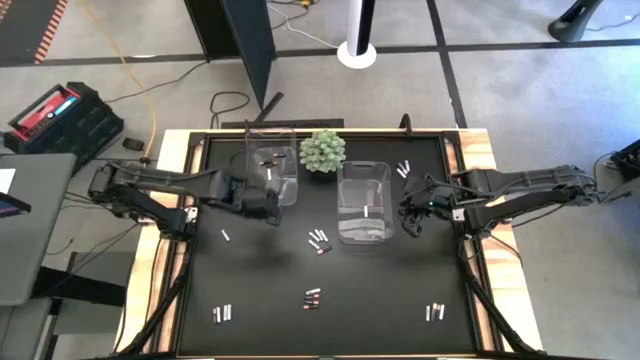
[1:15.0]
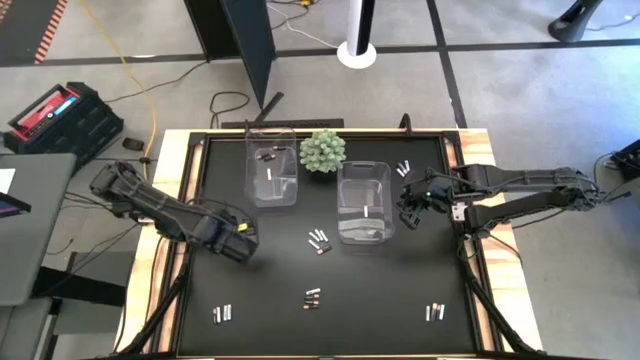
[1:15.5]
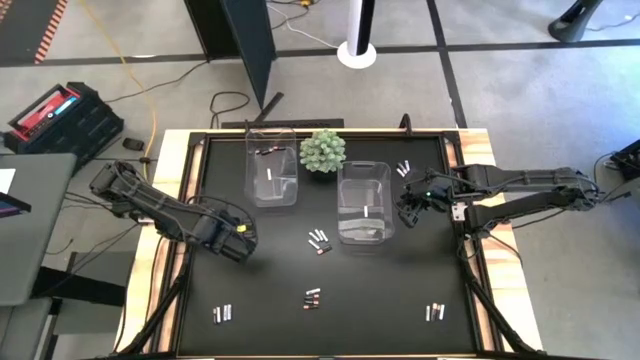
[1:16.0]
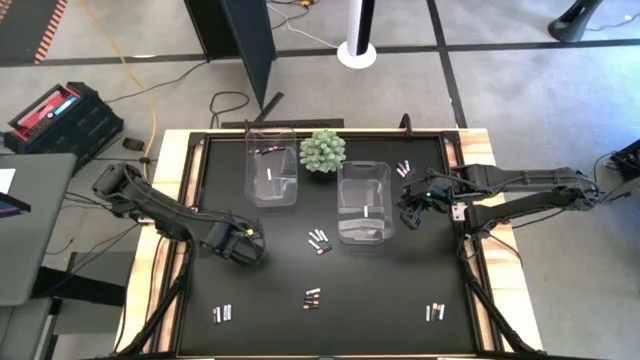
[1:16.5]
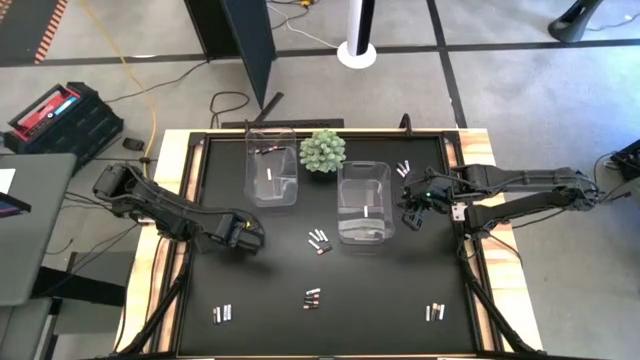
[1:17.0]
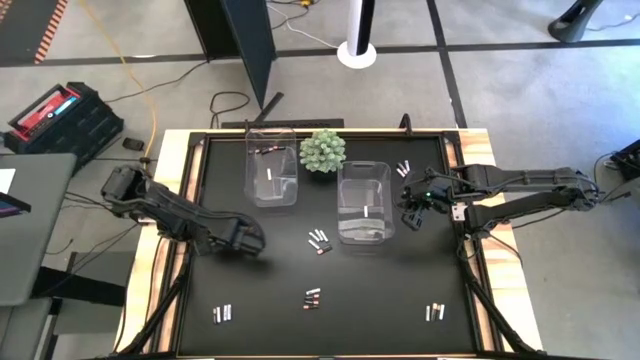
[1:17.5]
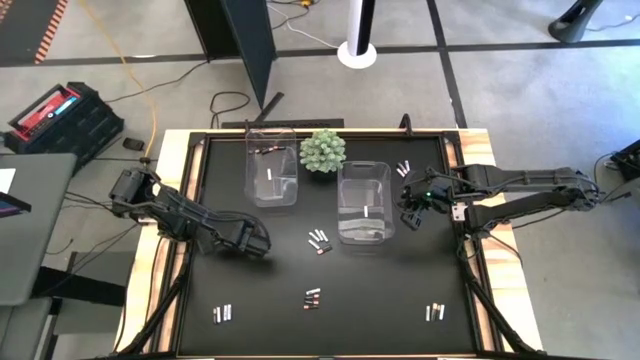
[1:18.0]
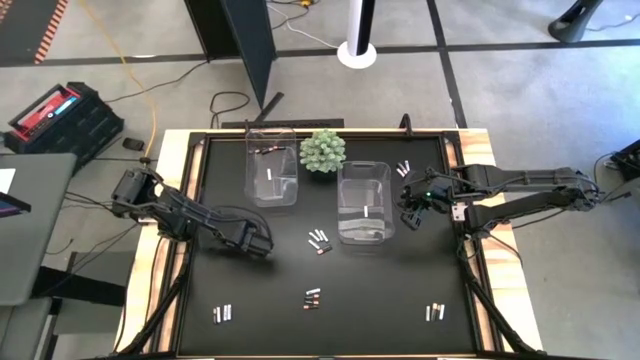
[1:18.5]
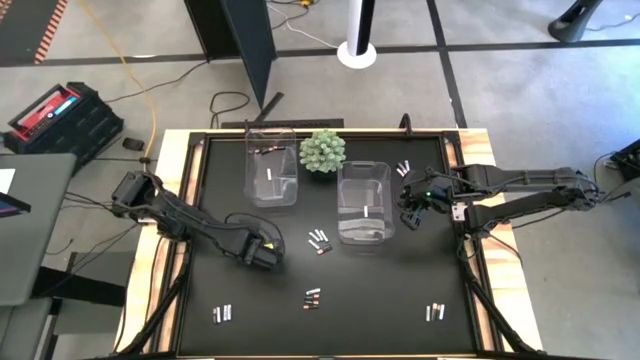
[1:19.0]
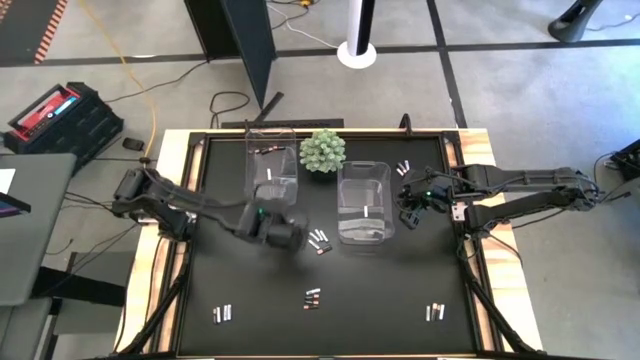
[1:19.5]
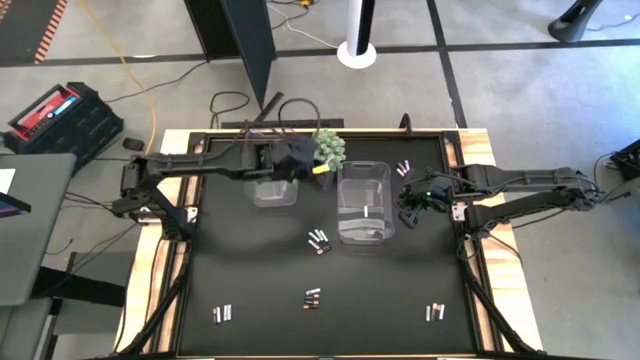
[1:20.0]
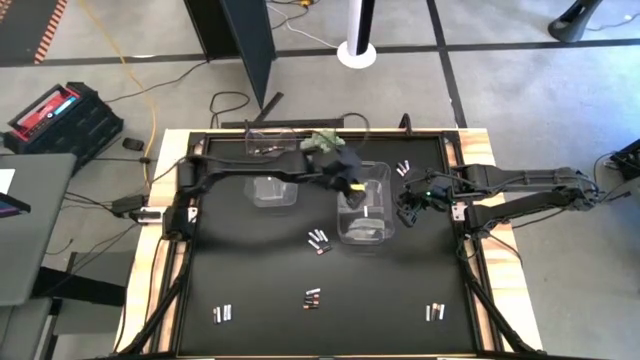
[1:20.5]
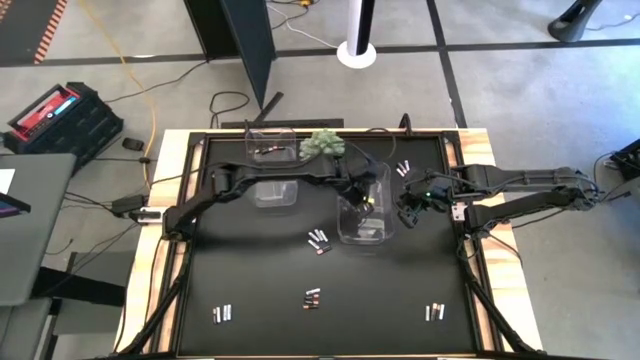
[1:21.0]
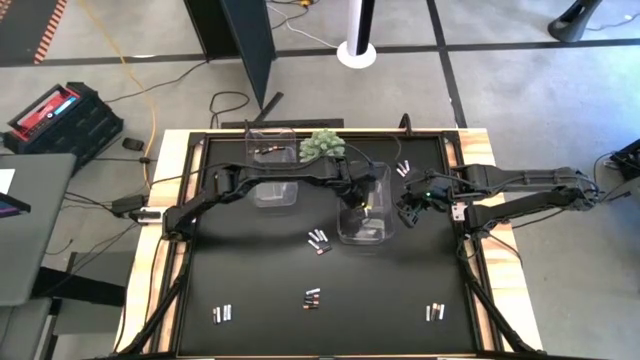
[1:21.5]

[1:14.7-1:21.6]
Task: Sort batteries
Put the white-blue battery into the right transparent bin

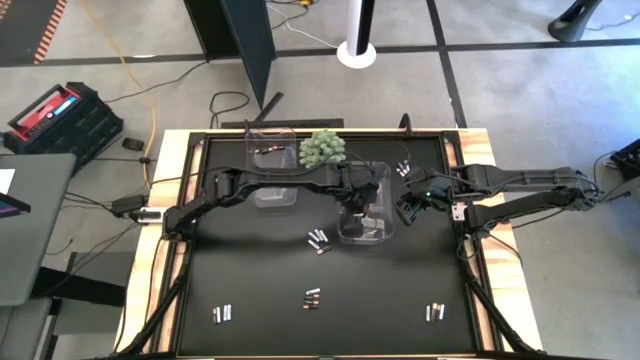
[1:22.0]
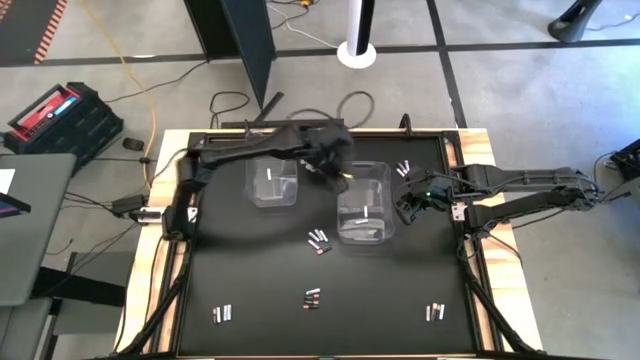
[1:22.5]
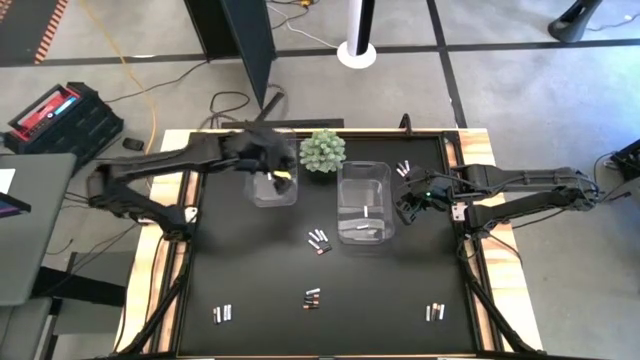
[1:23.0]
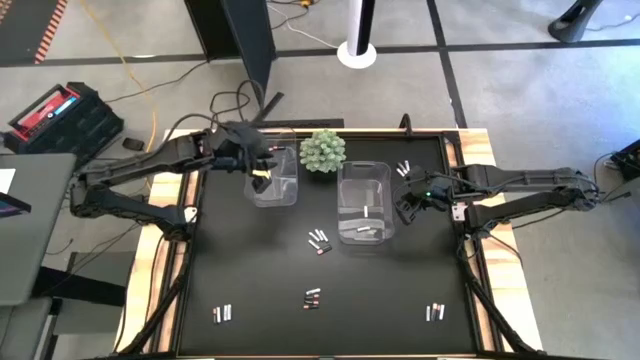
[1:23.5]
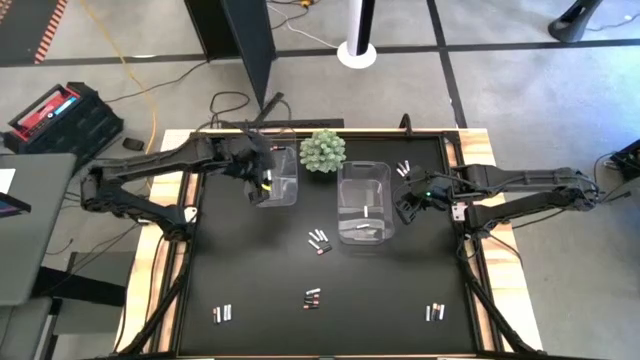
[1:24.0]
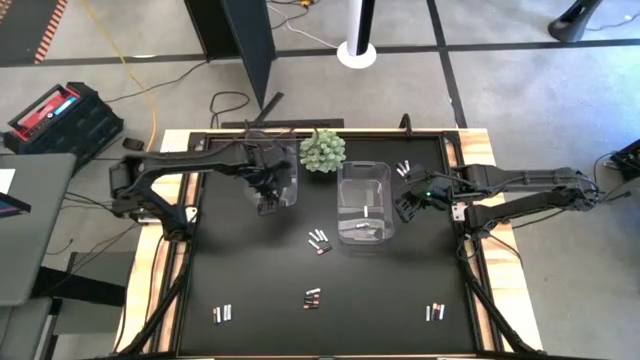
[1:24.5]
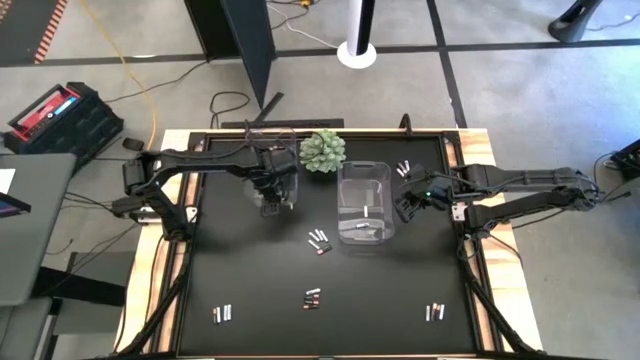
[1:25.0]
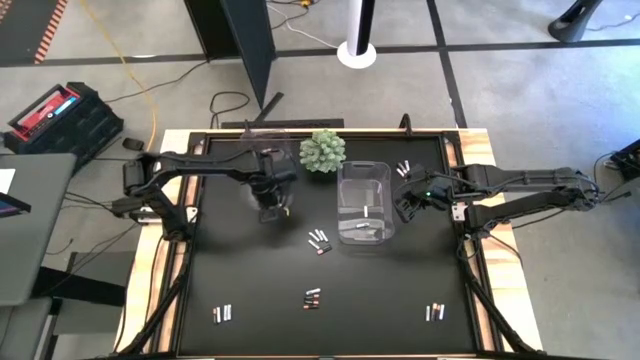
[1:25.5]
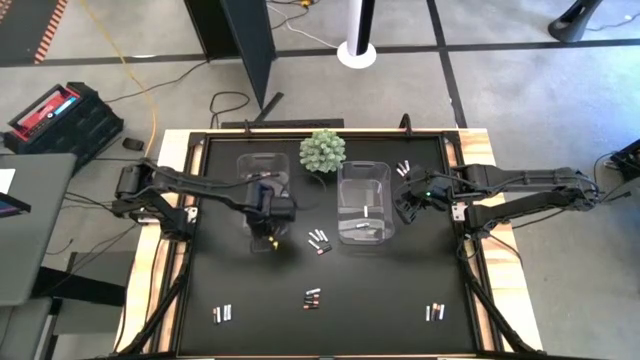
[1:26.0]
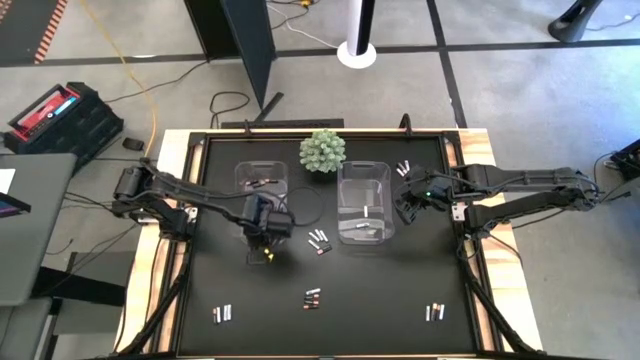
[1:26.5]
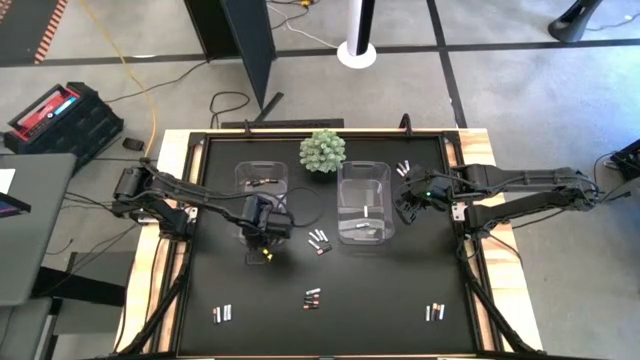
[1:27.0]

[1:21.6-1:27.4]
Adjust the left transparent bin

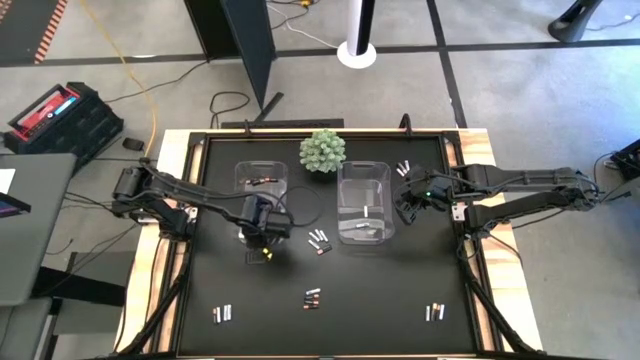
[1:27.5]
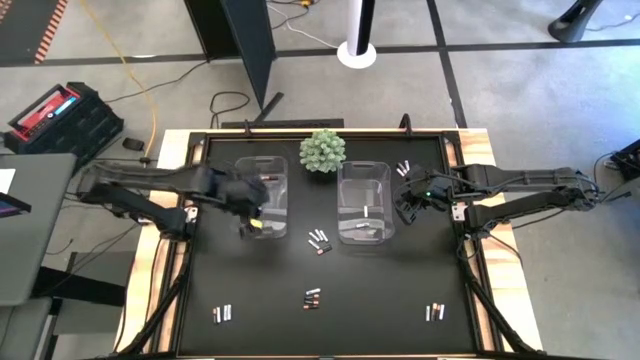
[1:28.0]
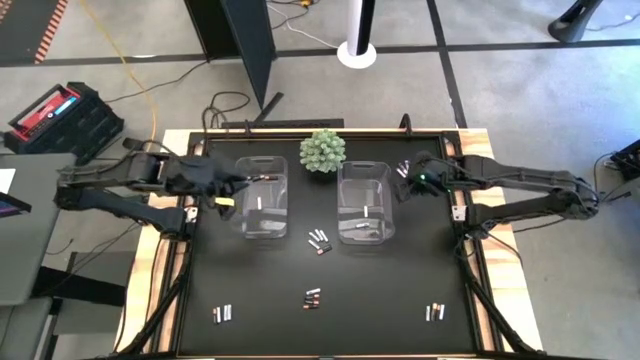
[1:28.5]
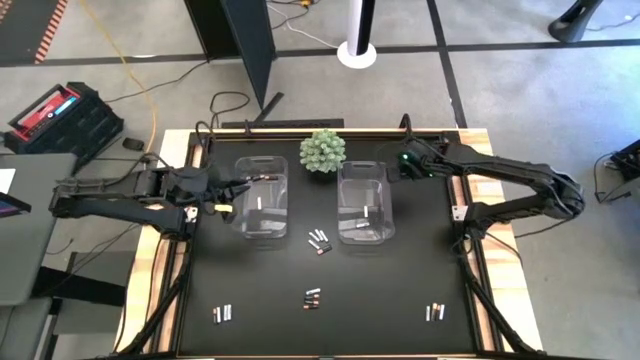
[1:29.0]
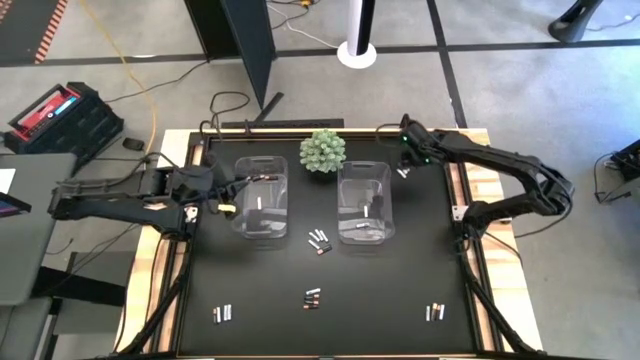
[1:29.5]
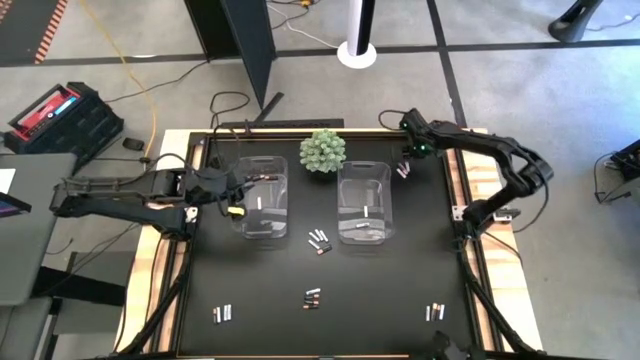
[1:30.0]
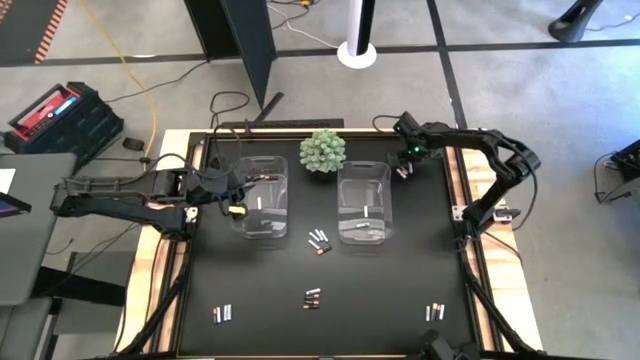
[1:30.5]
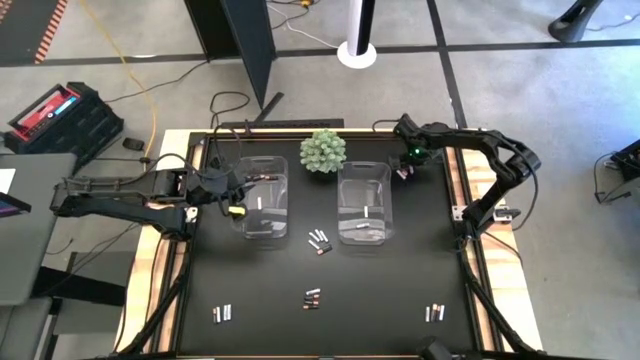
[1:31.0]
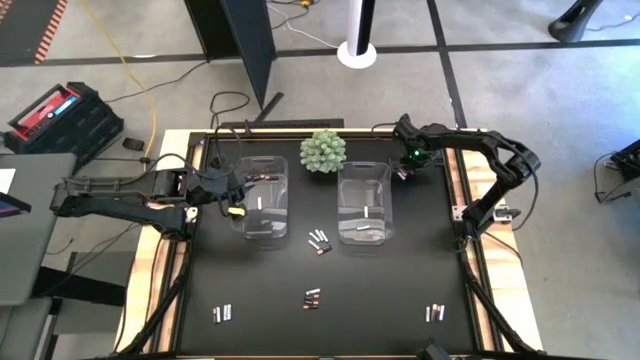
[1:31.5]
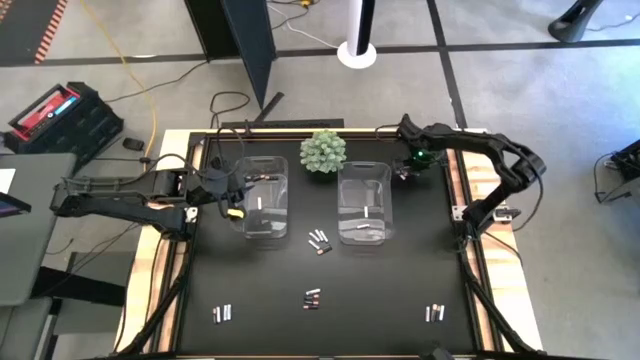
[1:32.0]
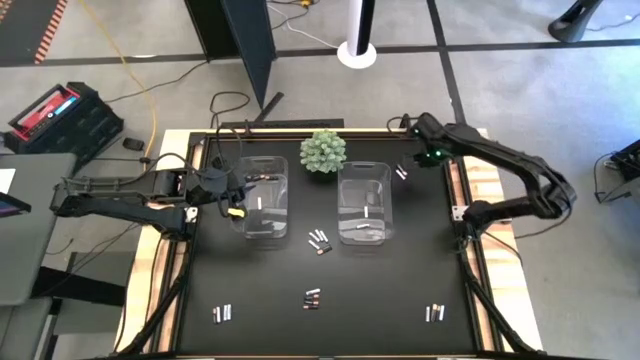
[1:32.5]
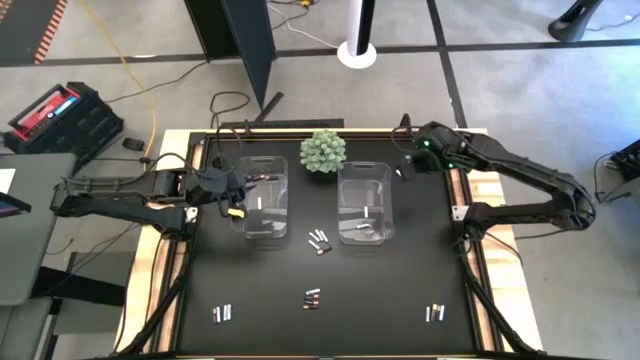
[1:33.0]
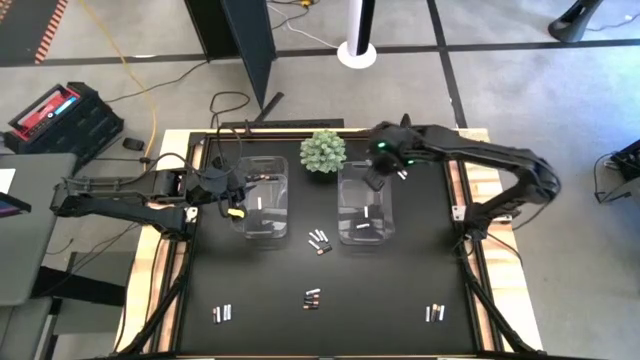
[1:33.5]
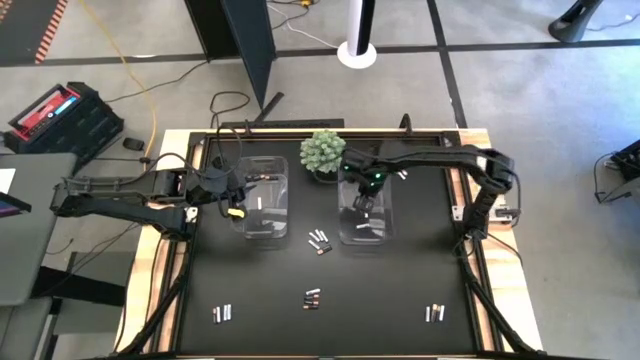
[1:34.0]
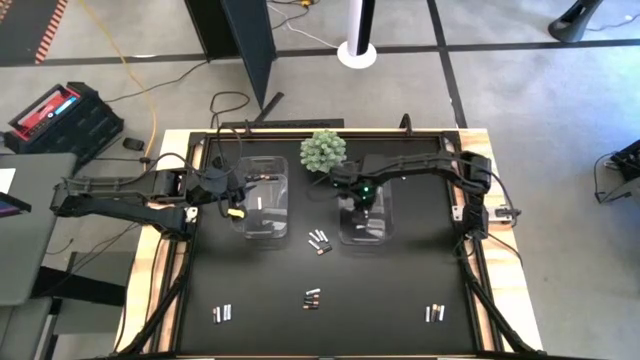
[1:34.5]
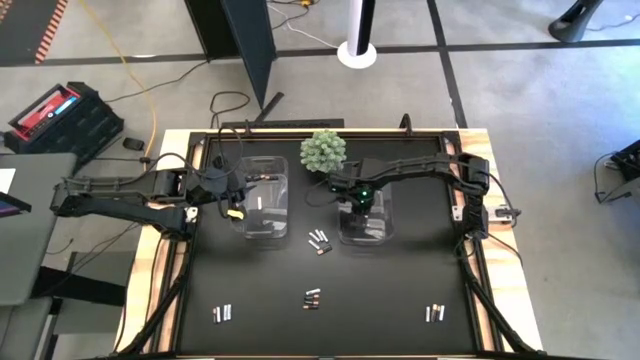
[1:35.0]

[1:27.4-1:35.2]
Put the white-blue battery into the right transparent bin

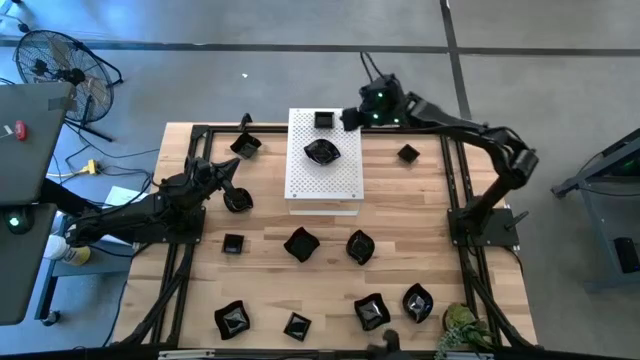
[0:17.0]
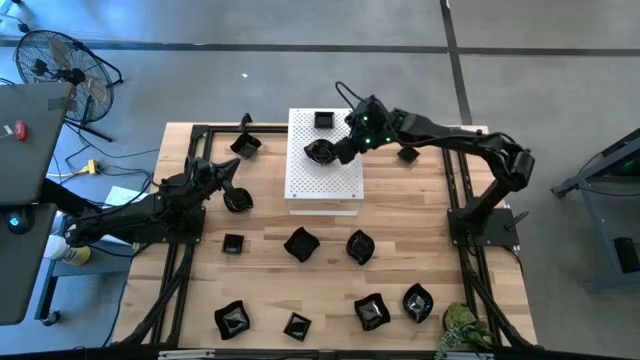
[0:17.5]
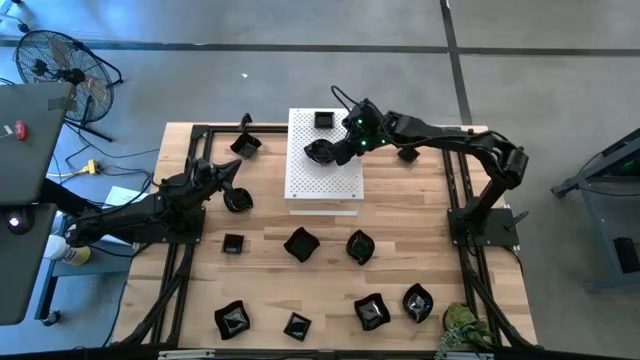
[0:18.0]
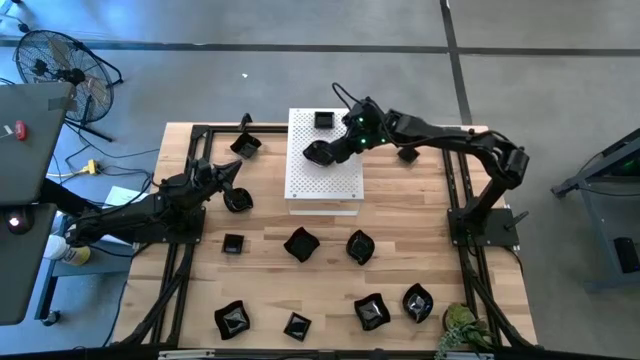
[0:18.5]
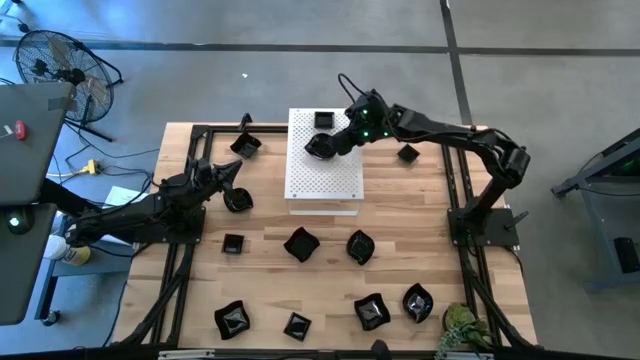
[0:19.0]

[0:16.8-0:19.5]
Task: Pick & Place Mini shaped plates
Adjust the black leaf shaped plate on the shelf
